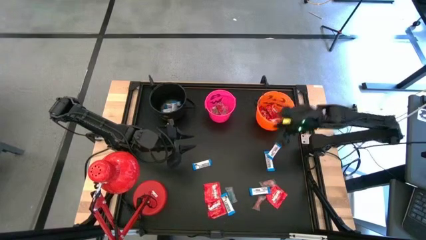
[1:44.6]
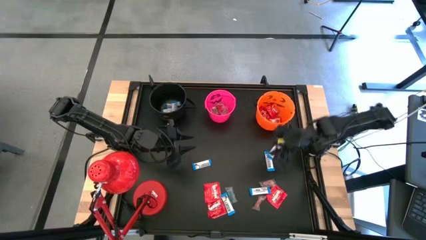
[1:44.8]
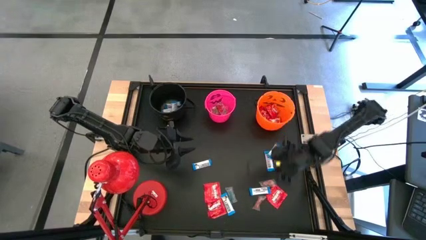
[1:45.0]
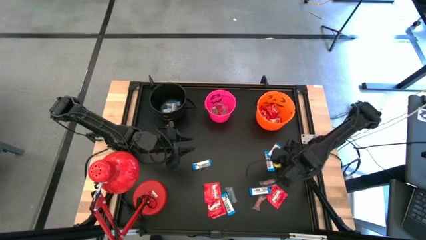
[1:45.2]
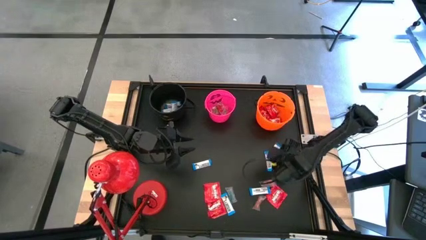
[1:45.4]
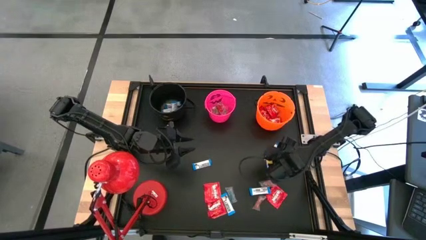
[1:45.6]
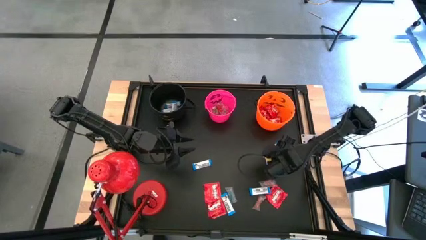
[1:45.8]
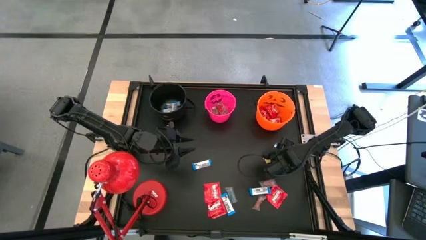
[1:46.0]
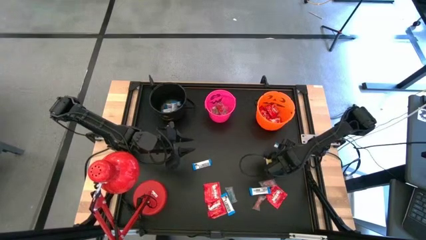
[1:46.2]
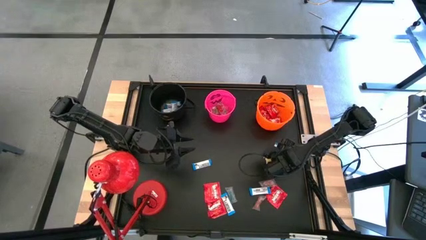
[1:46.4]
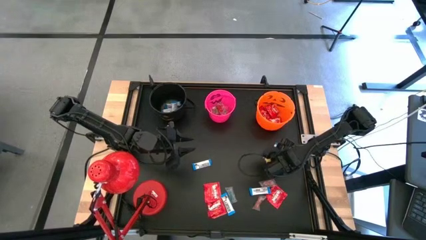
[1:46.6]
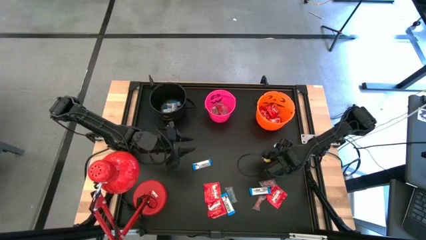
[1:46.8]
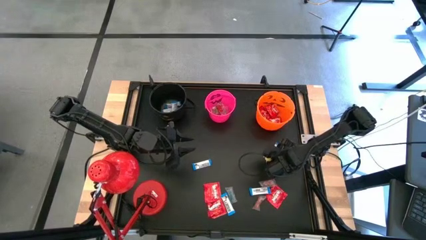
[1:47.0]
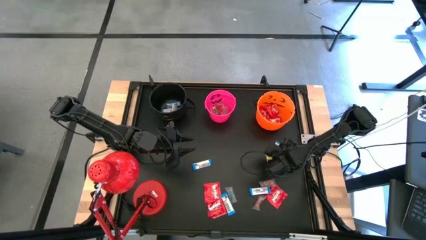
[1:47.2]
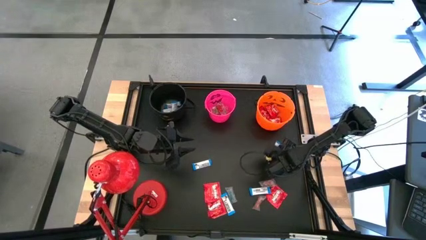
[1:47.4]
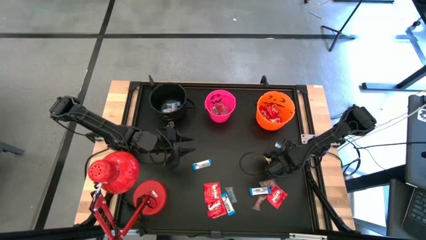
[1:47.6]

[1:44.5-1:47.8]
Task: Organize candy in baskets
Put the white chocolate bar into the black bucket

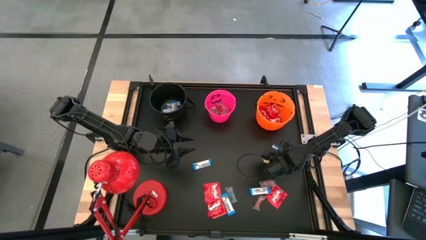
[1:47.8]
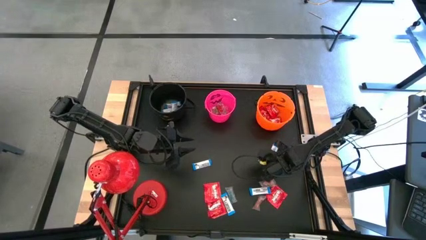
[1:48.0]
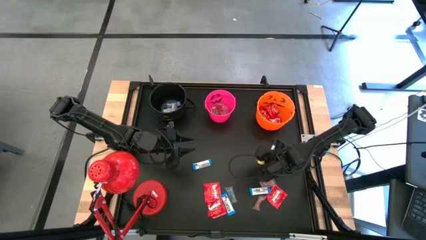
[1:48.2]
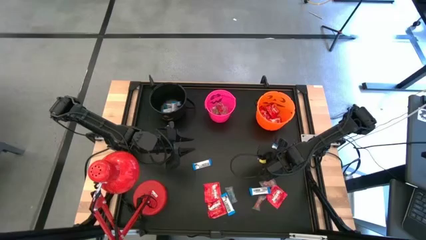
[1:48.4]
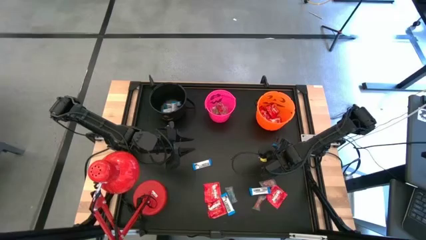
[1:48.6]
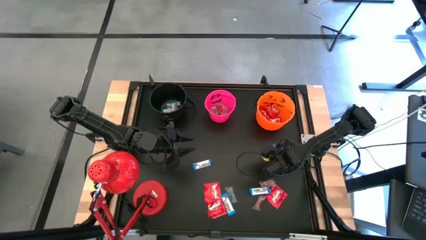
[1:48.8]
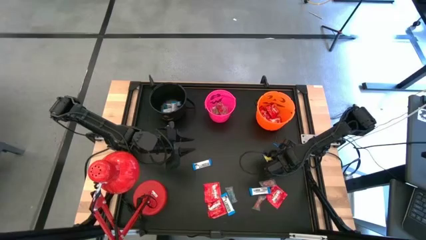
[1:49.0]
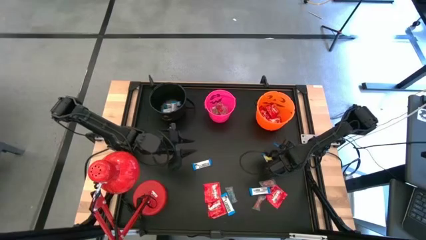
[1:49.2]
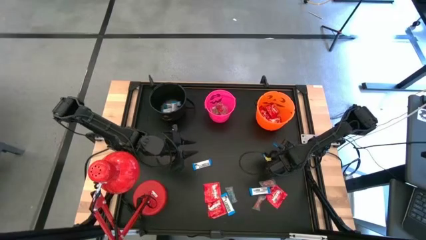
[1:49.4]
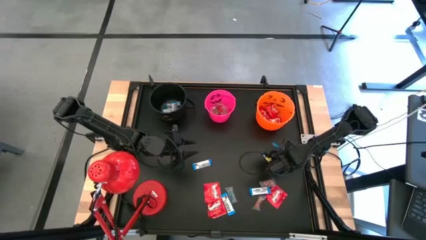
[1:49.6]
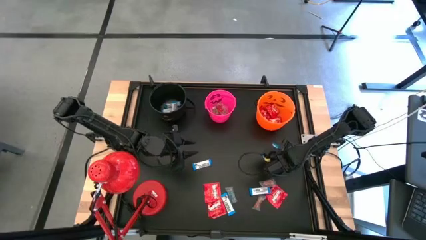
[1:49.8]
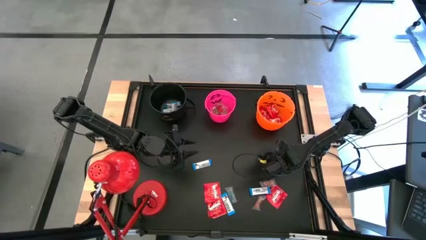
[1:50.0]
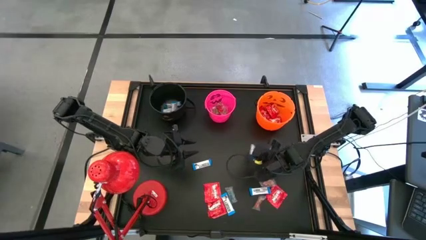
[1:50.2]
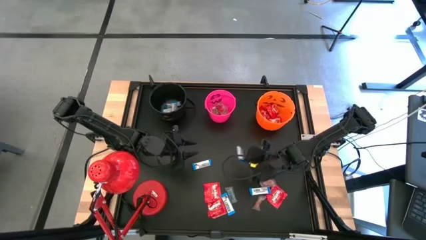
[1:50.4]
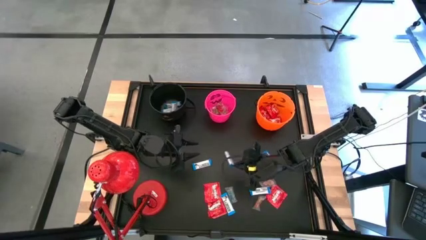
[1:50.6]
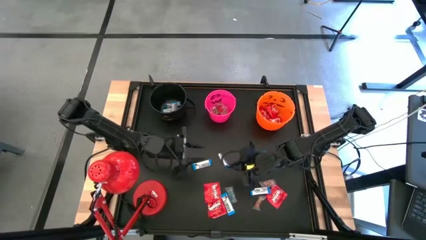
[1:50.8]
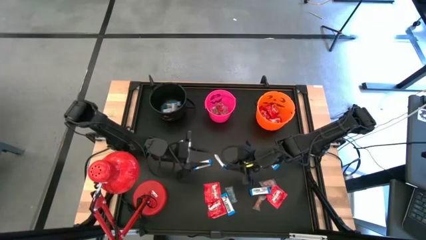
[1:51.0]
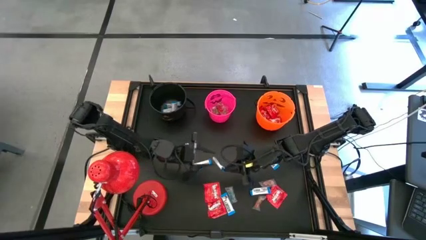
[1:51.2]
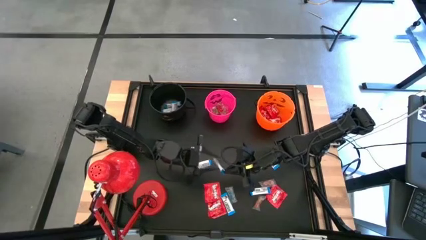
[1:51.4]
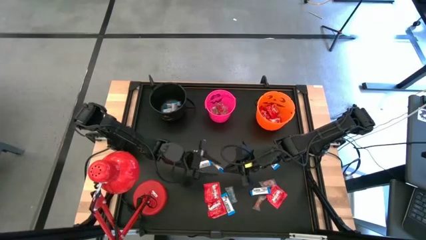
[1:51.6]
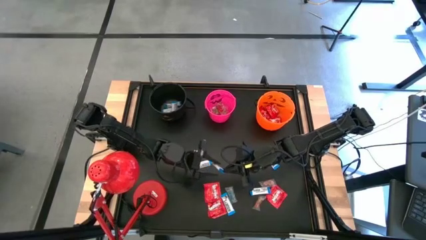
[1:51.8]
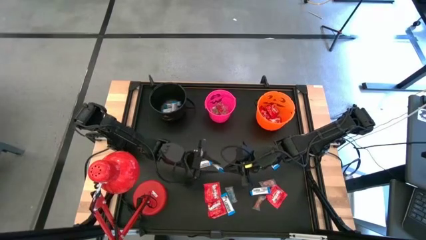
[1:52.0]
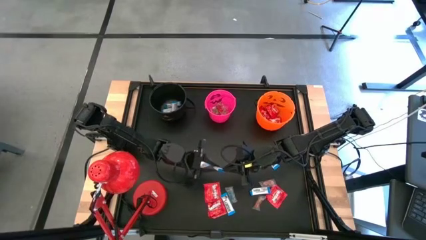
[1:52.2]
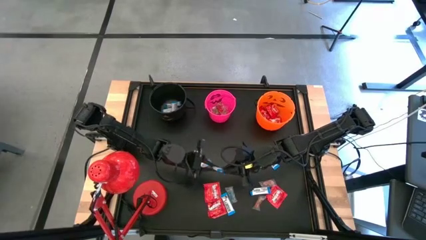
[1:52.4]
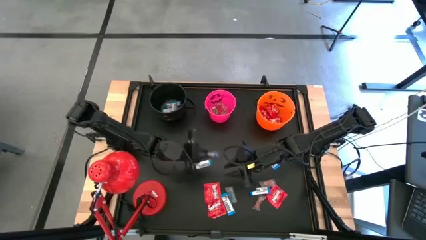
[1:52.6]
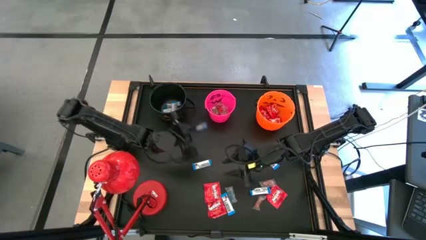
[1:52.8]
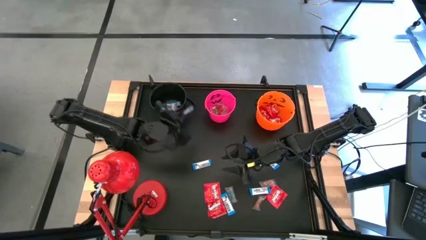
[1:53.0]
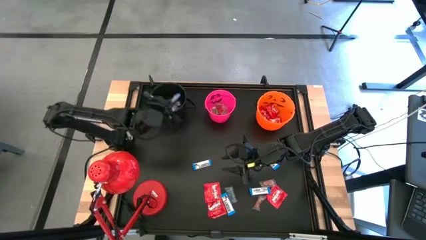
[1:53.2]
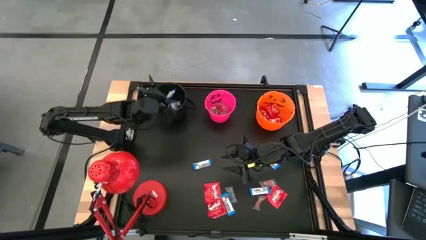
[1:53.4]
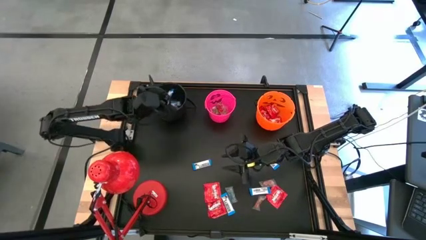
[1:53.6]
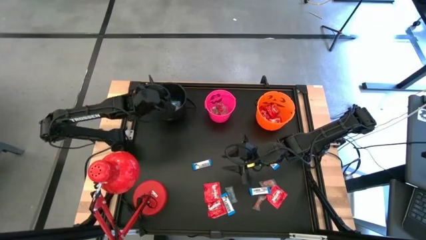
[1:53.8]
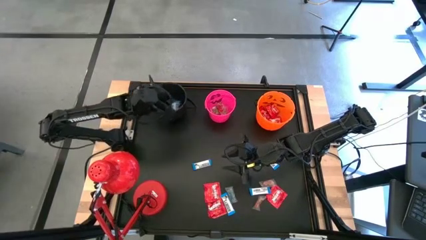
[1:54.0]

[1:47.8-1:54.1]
Put the white chocolate bar into the black bucket

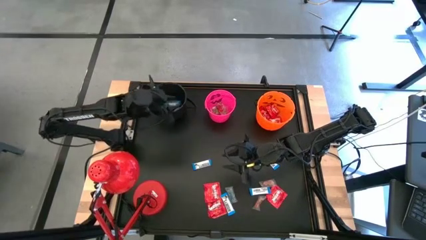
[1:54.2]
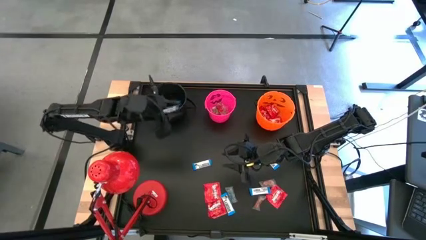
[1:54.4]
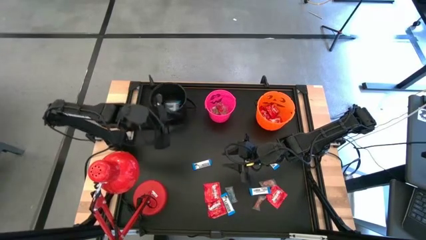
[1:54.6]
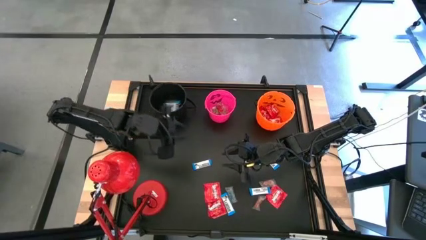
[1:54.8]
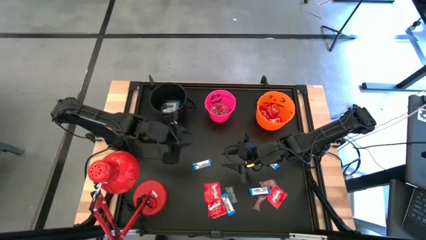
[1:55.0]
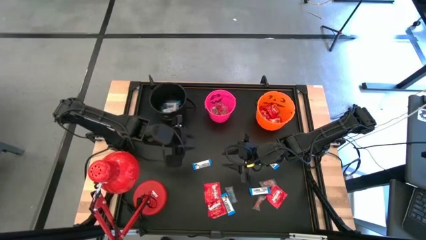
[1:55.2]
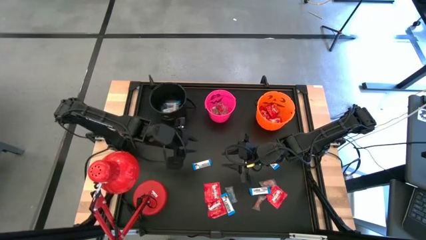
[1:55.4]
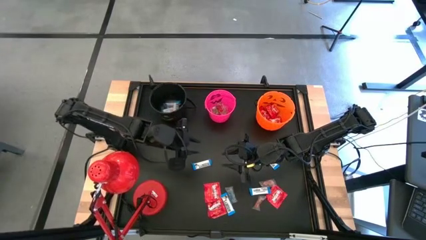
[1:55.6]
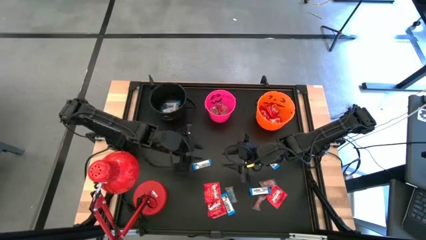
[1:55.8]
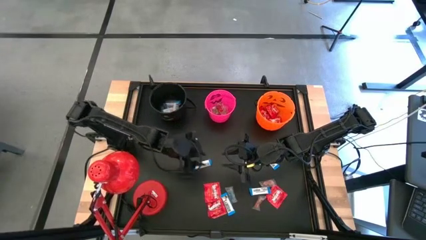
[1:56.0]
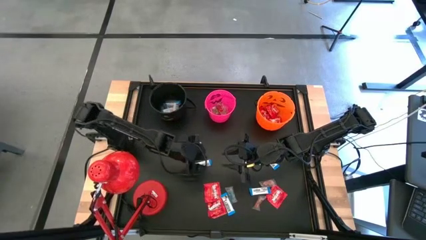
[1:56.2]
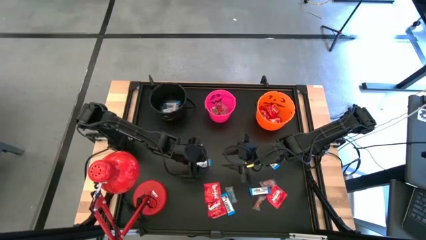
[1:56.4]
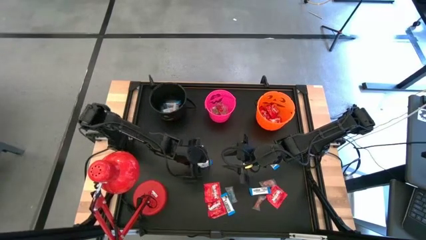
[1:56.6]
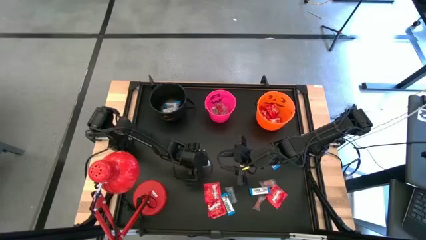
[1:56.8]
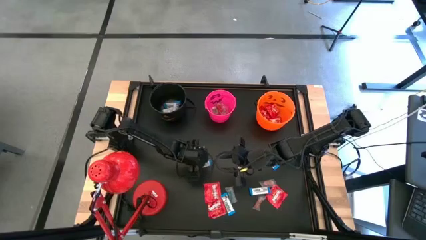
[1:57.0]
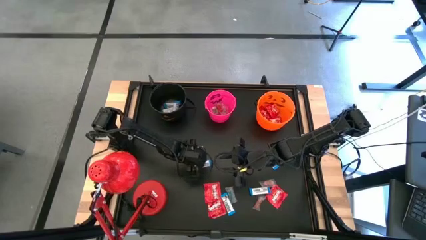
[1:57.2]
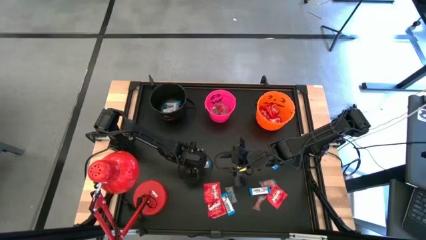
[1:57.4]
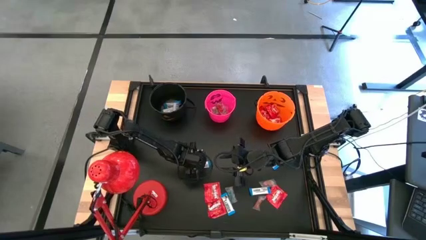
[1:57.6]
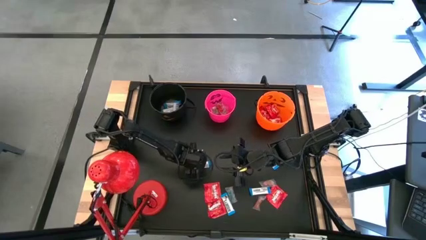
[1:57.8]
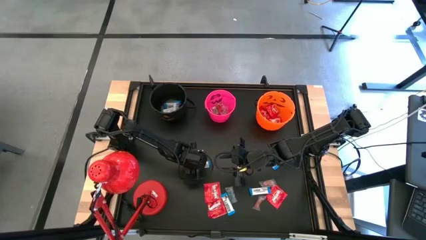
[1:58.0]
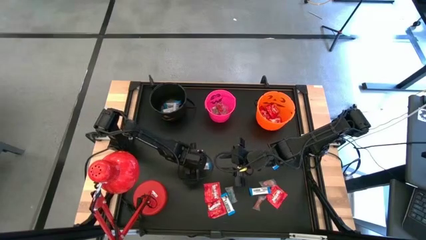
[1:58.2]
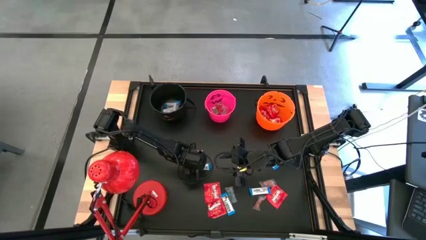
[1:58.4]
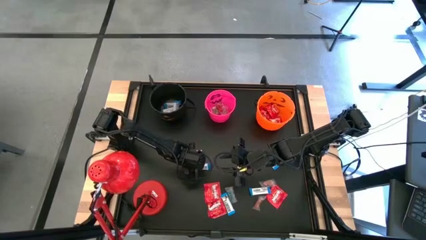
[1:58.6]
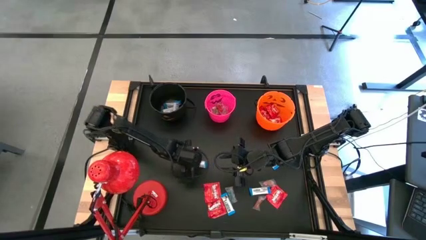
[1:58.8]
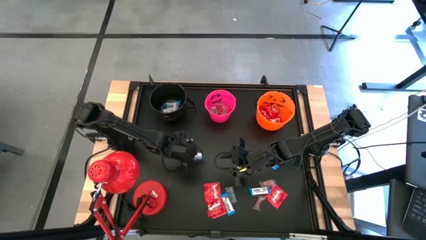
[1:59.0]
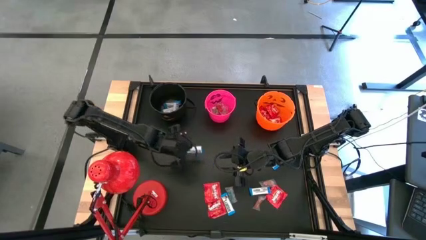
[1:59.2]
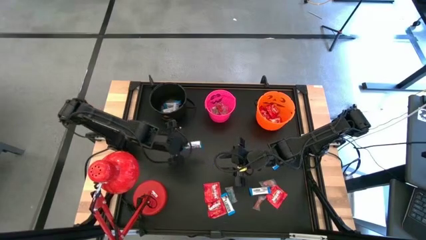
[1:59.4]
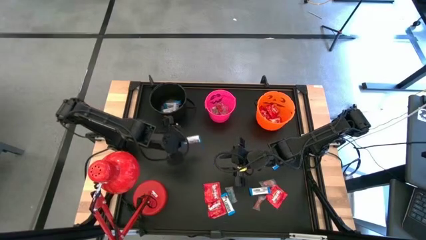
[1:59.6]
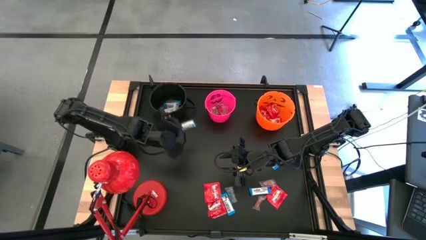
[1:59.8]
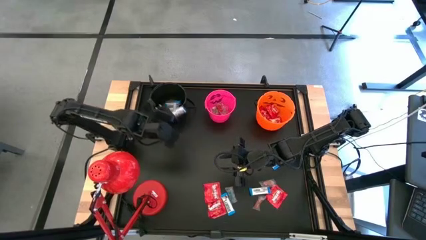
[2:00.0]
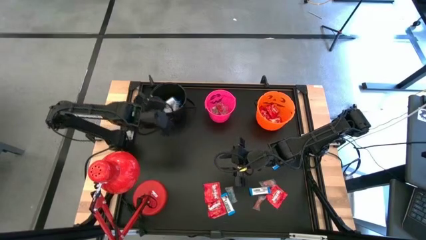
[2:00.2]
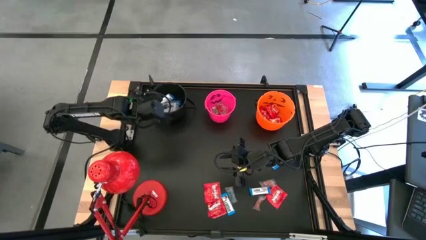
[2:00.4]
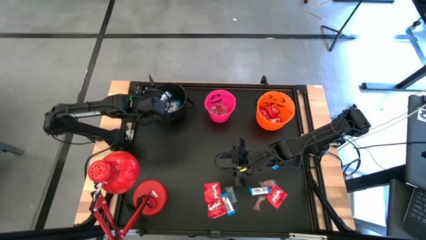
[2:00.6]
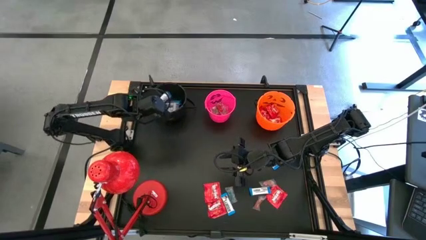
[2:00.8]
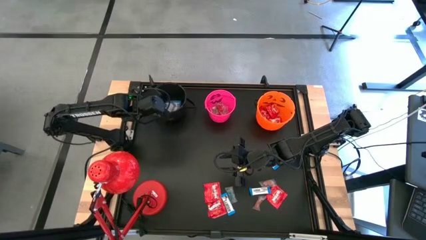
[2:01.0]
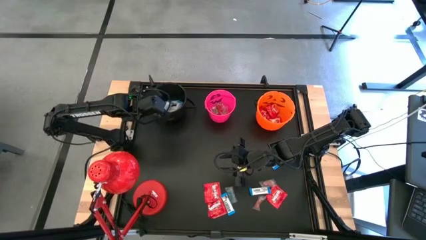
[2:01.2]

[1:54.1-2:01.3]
Put the white chocolate bar into the black bucket
